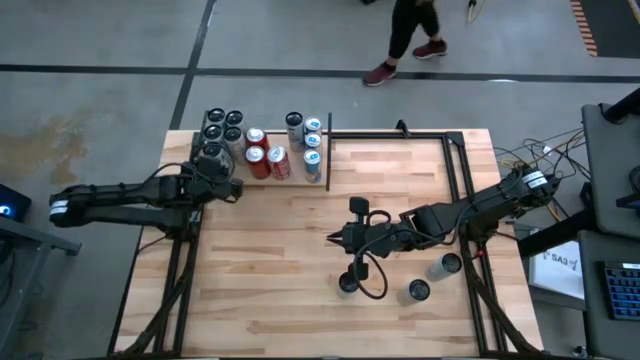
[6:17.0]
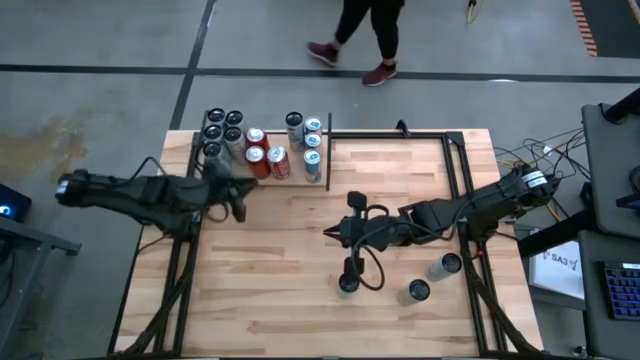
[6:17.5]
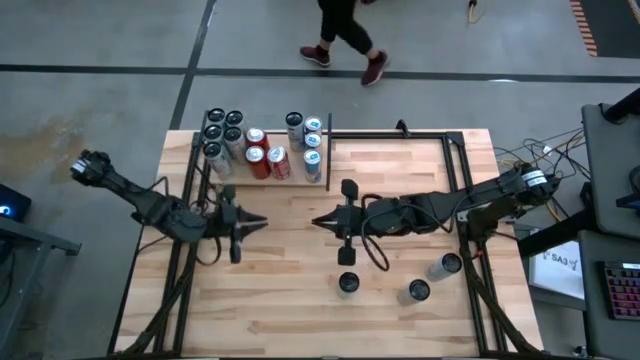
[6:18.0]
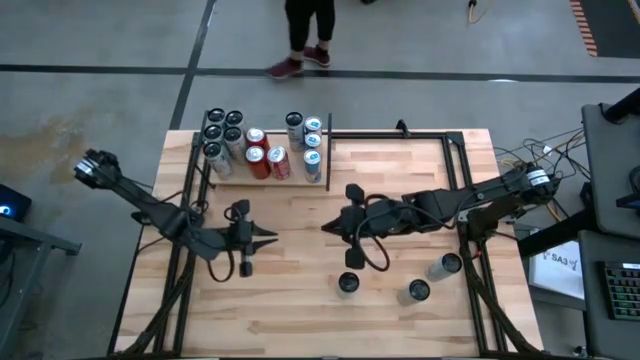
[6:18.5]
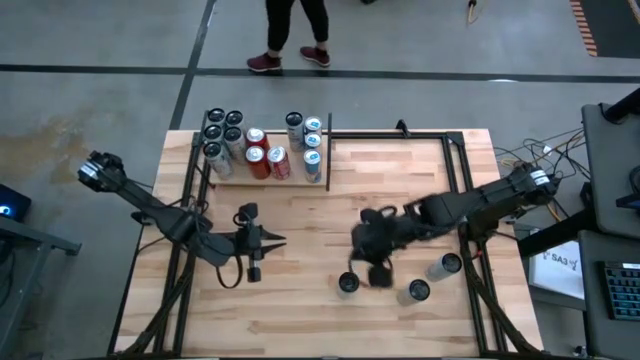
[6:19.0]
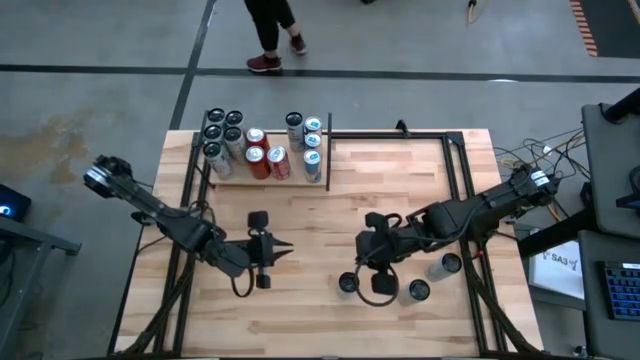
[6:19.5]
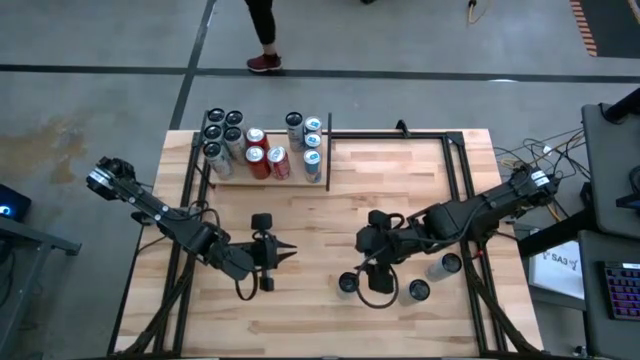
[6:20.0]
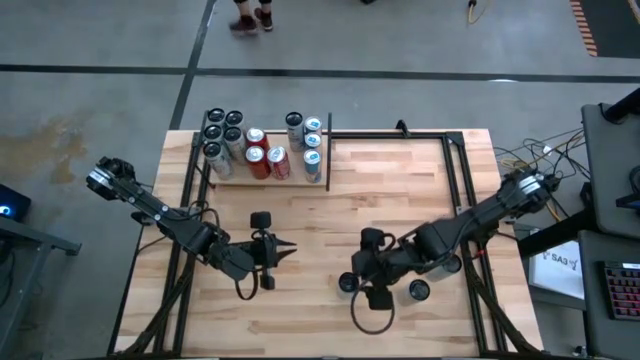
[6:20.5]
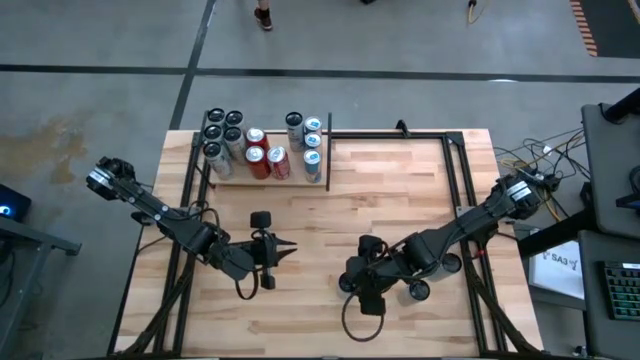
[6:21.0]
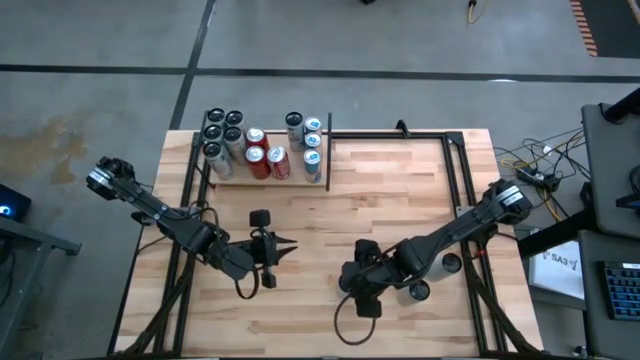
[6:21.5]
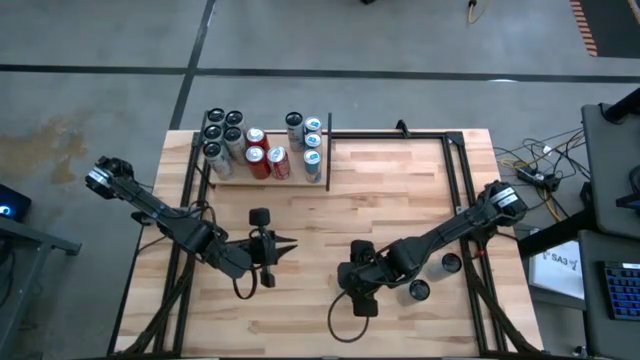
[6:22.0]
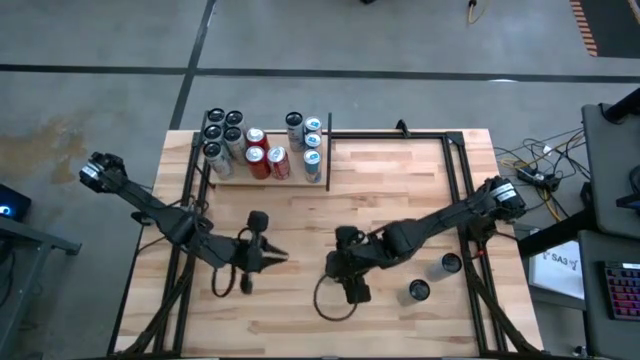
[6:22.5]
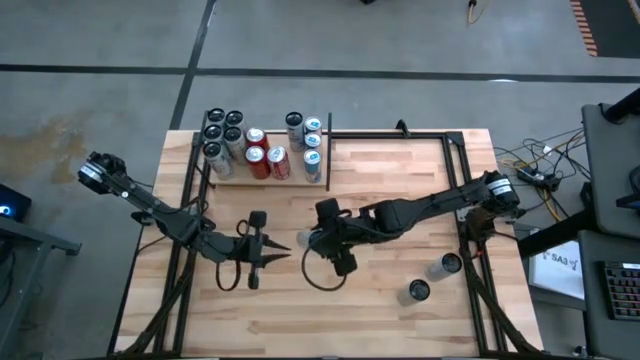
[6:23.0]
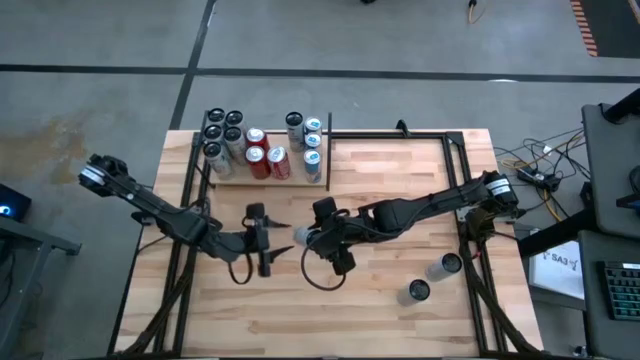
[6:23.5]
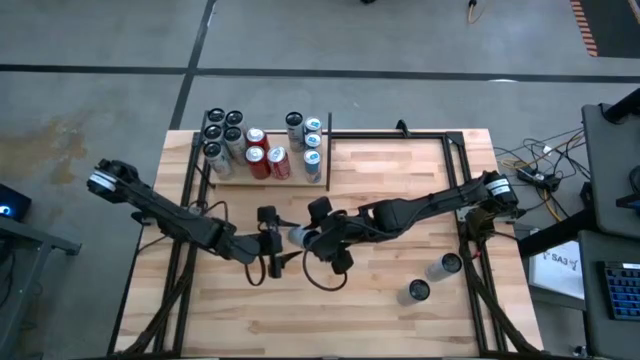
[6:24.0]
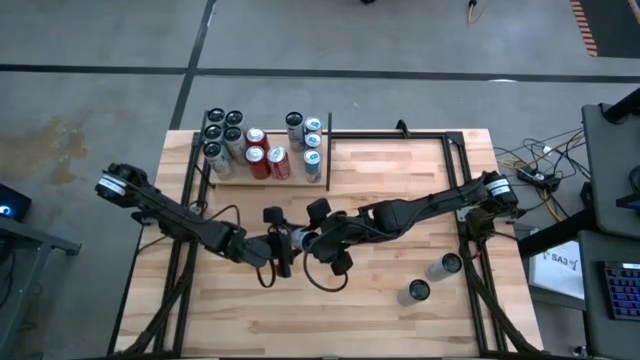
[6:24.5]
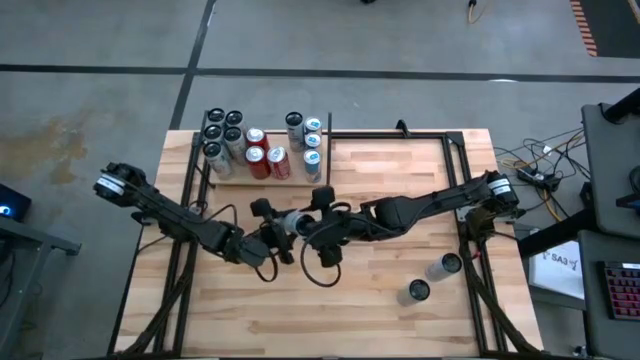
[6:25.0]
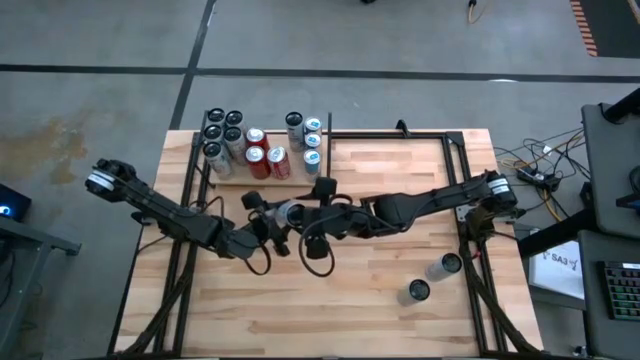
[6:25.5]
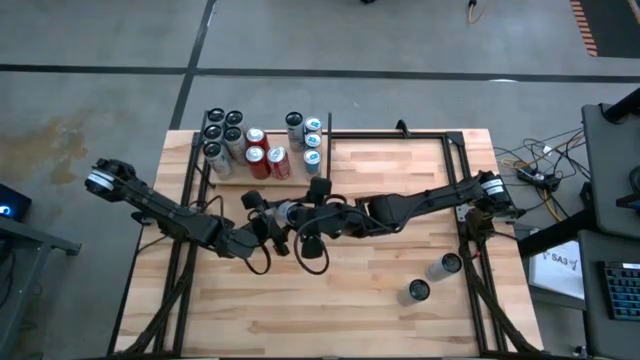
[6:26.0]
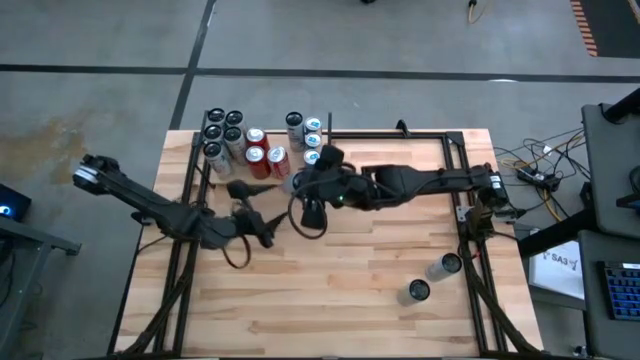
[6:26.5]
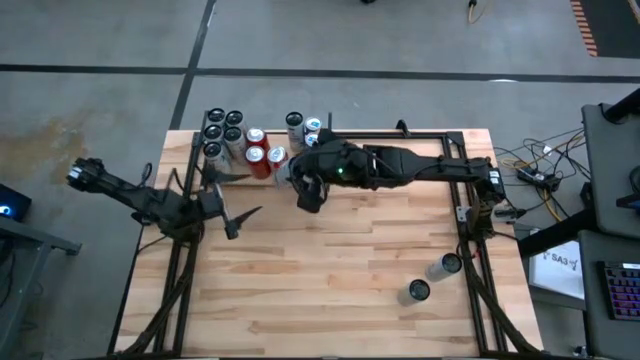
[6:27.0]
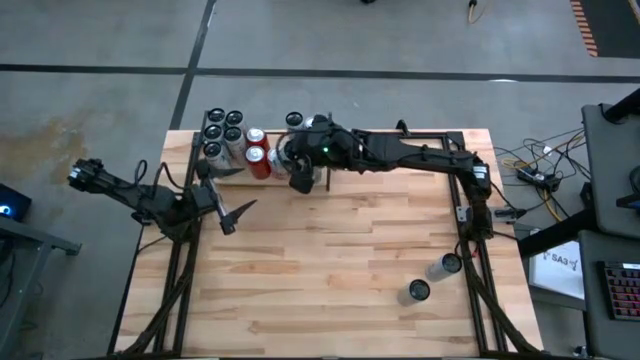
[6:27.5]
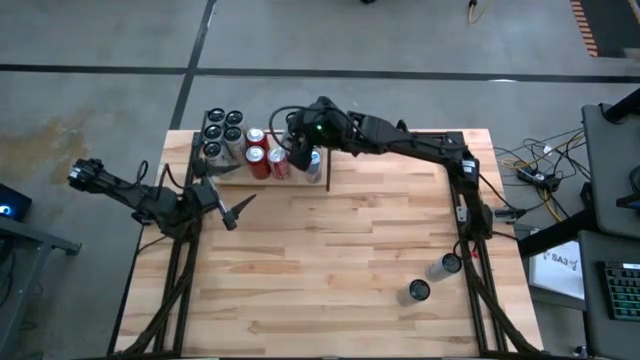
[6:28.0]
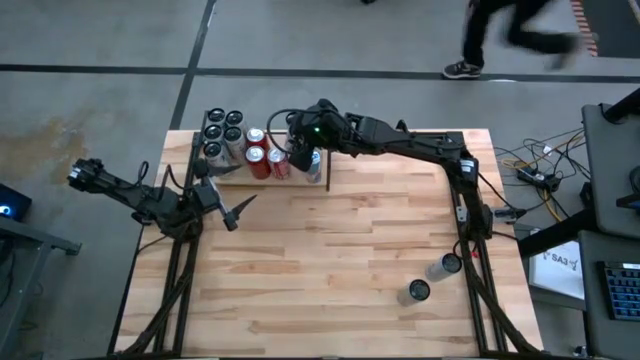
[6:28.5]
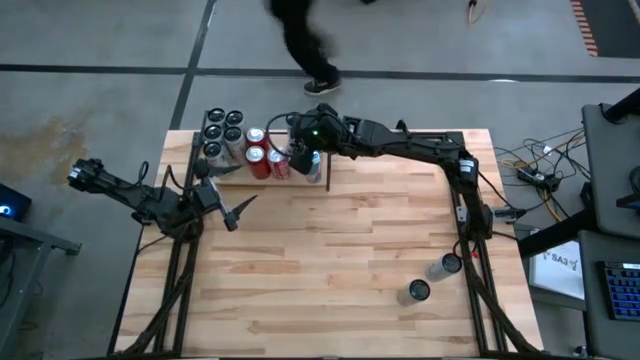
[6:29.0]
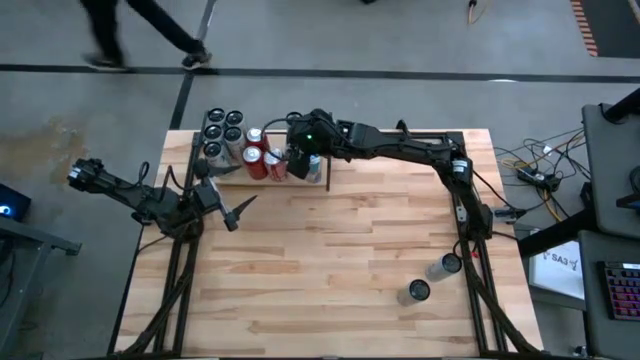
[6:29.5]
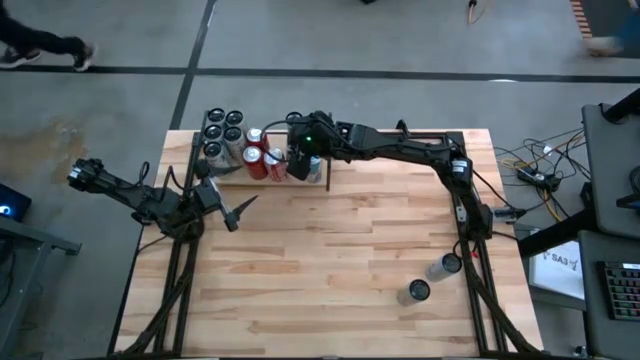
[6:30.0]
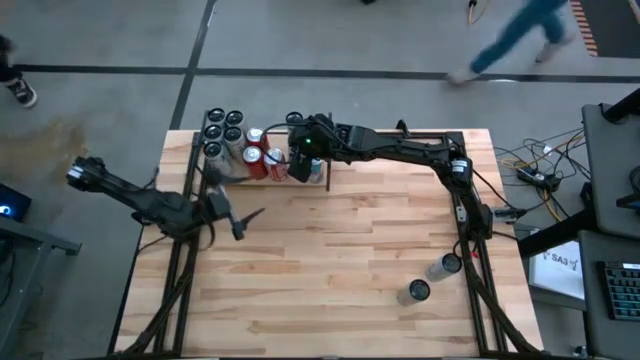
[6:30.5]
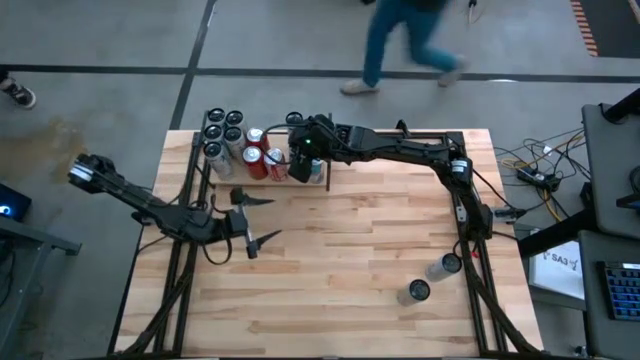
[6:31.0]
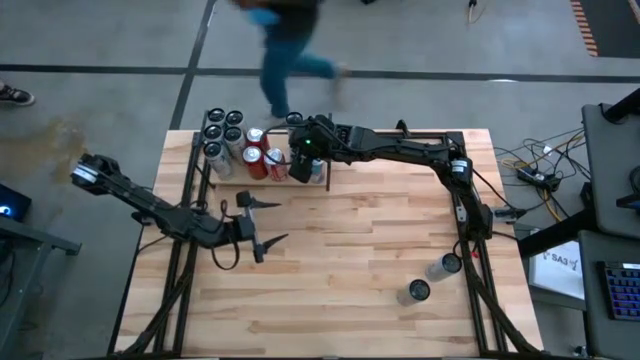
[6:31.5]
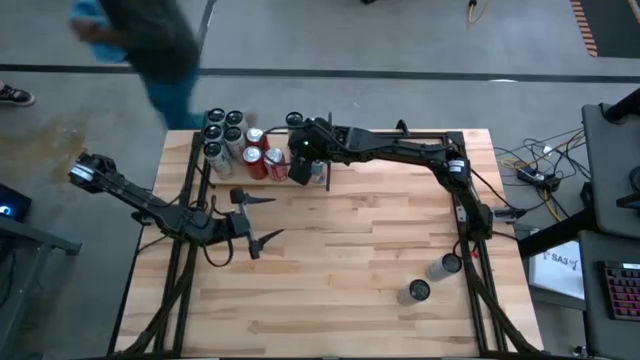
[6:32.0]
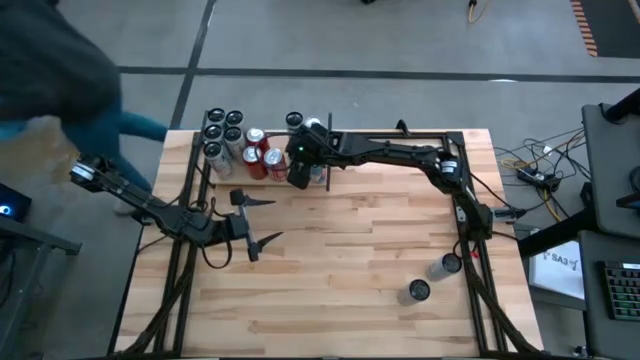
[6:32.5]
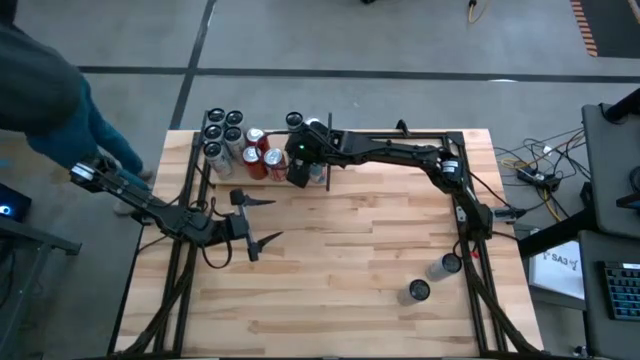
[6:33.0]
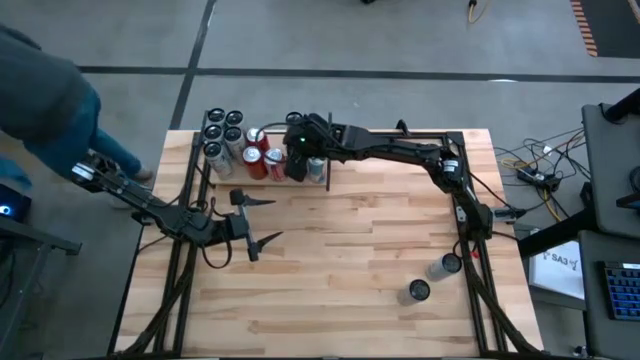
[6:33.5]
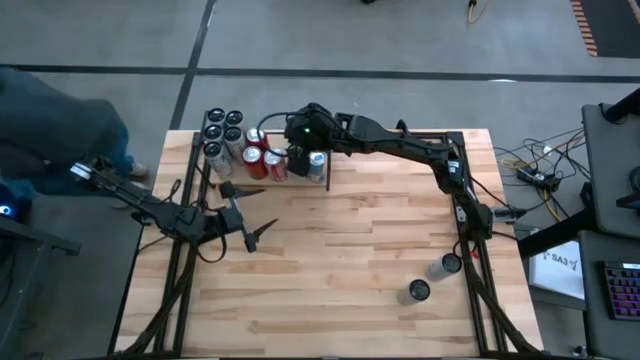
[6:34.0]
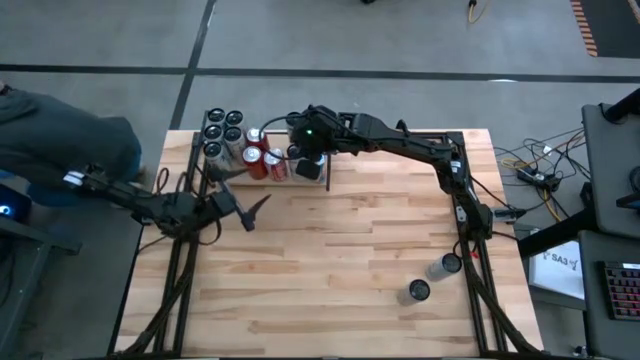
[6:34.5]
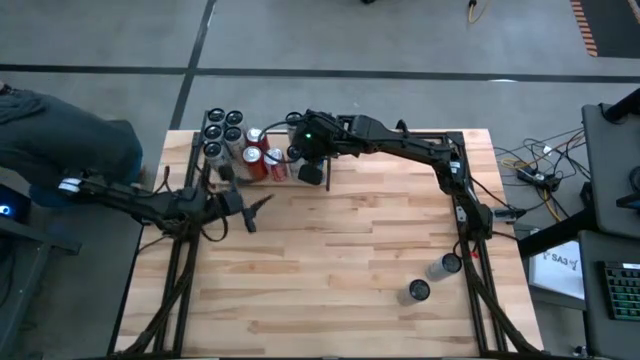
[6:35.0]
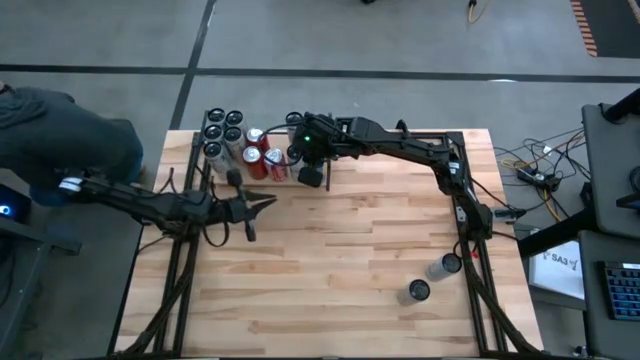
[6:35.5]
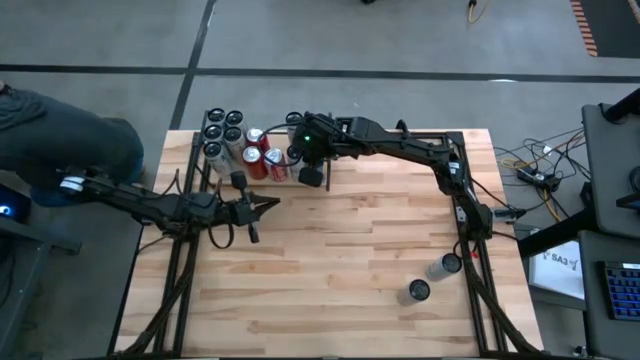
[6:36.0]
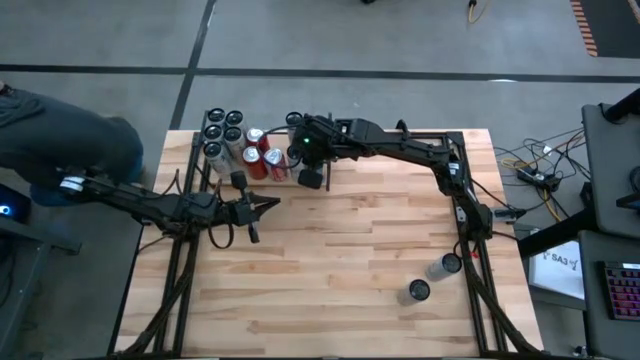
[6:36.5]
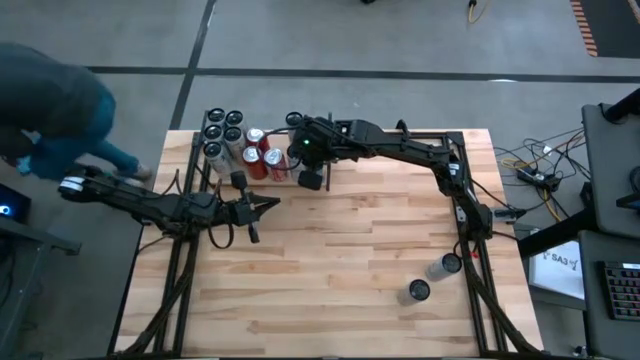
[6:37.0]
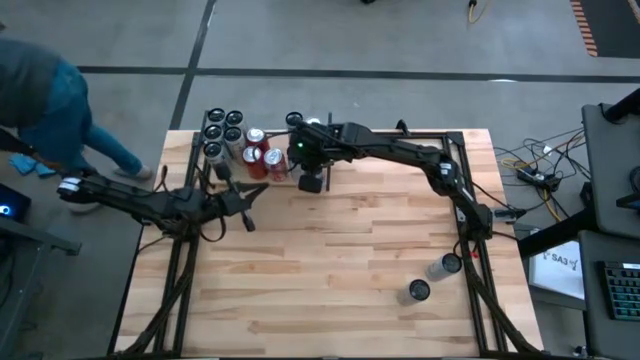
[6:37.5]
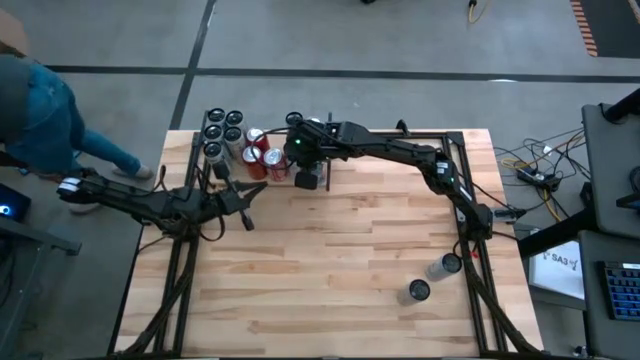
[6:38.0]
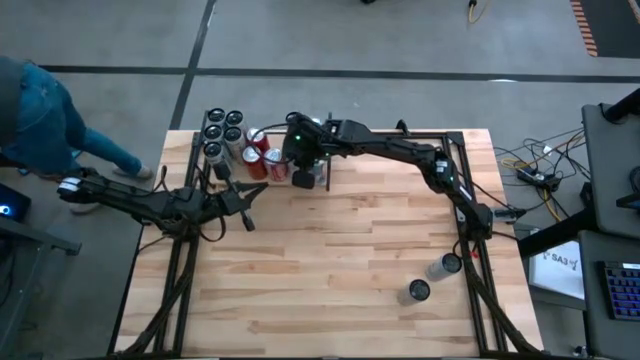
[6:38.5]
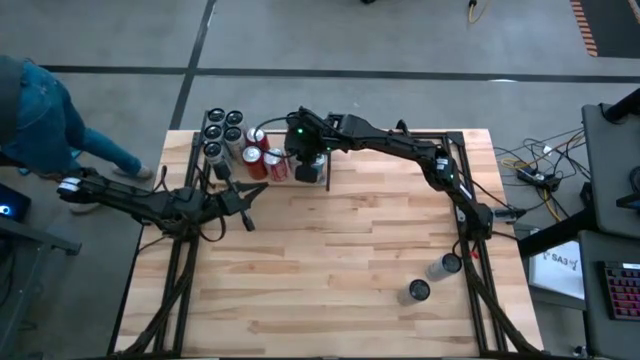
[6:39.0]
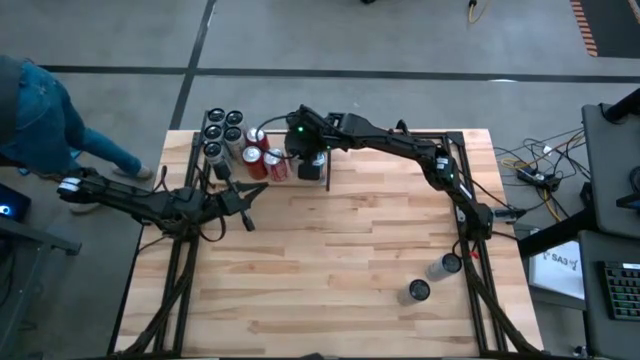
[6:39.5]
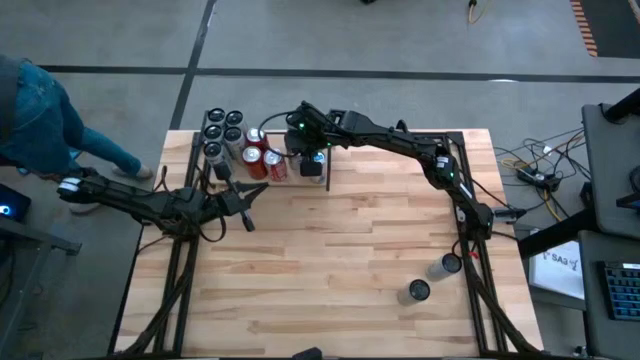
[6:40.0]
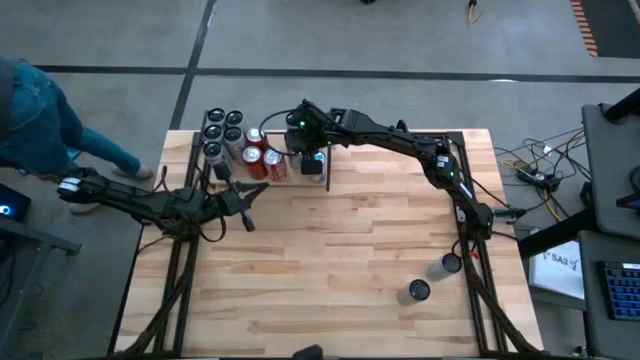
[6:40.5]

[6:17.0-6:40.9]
Task: Place canned beverage on shelf
Put the left white and blue soda can on the shelf aligned with the other white and blue soda cans
